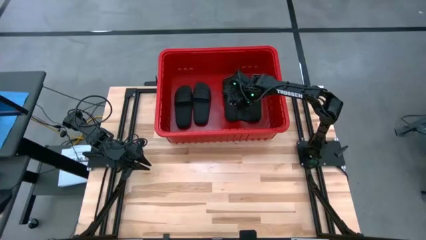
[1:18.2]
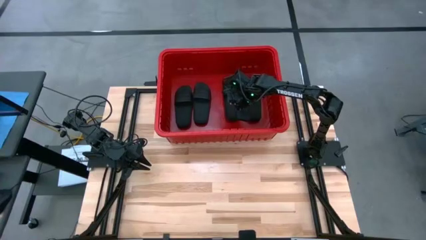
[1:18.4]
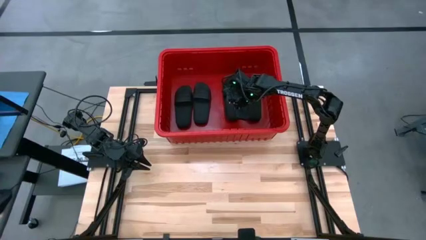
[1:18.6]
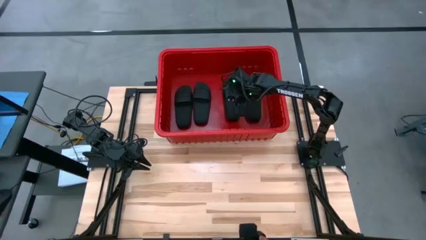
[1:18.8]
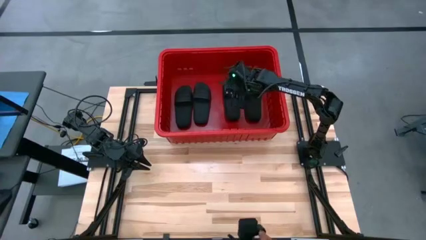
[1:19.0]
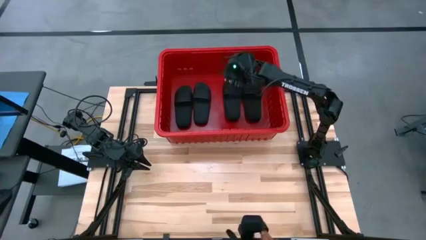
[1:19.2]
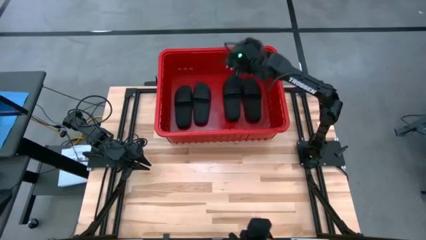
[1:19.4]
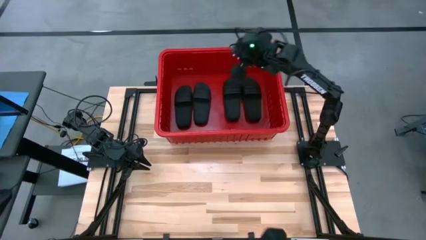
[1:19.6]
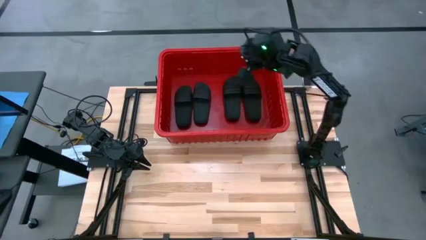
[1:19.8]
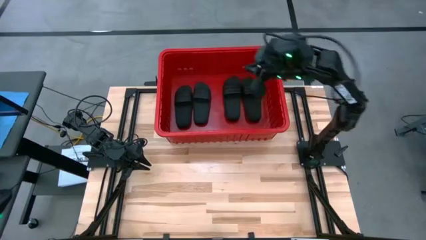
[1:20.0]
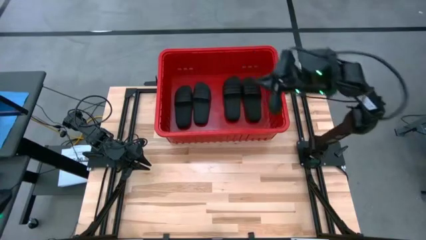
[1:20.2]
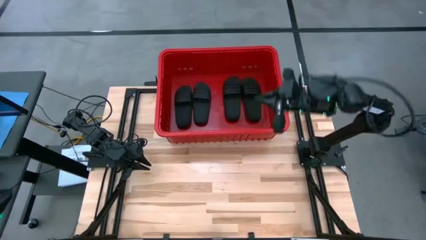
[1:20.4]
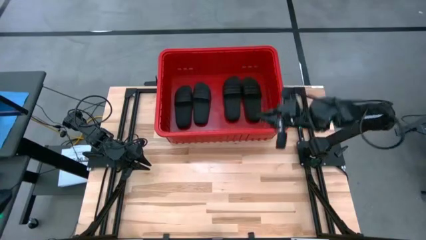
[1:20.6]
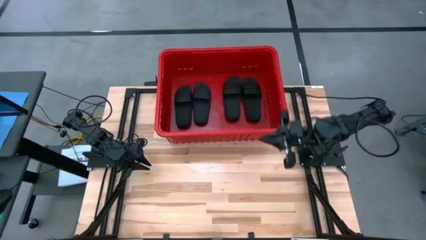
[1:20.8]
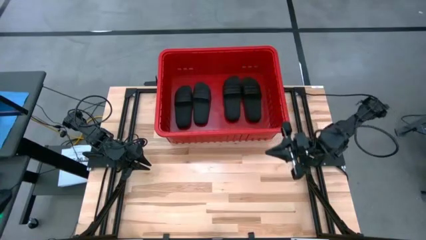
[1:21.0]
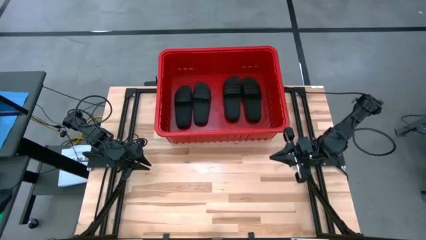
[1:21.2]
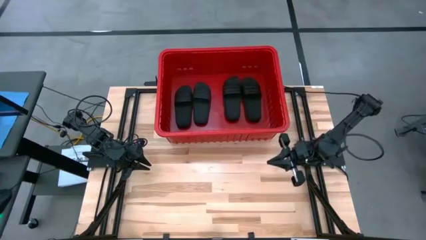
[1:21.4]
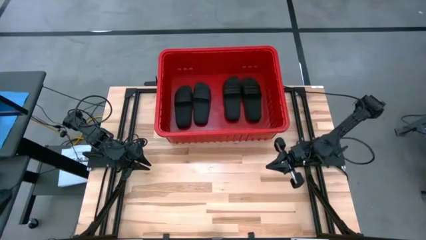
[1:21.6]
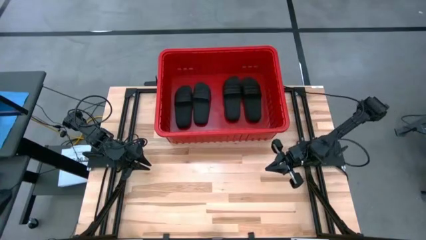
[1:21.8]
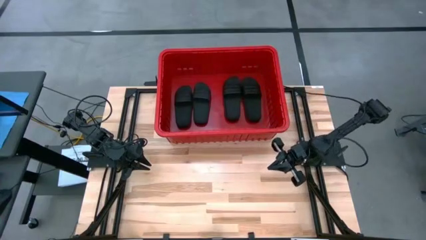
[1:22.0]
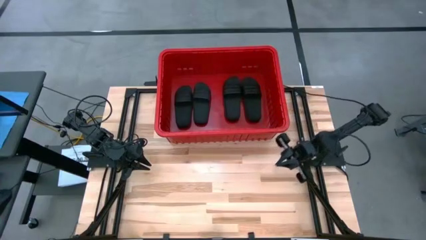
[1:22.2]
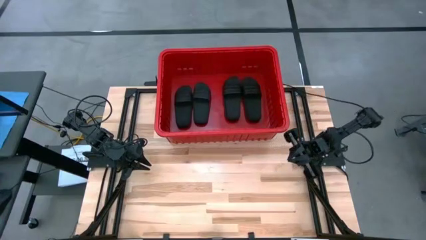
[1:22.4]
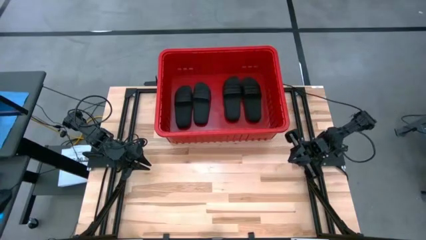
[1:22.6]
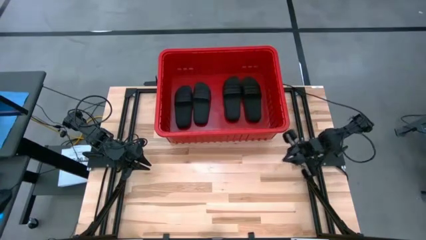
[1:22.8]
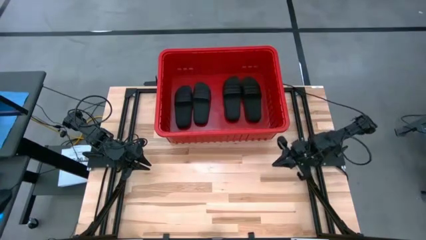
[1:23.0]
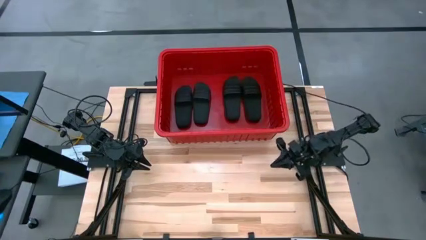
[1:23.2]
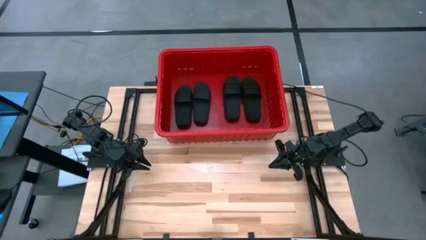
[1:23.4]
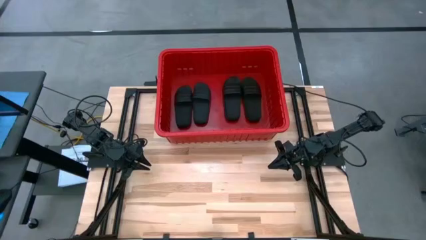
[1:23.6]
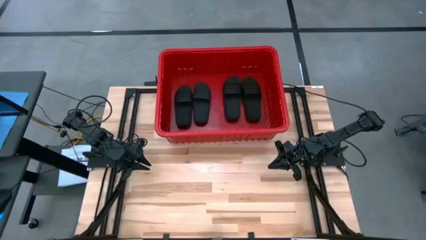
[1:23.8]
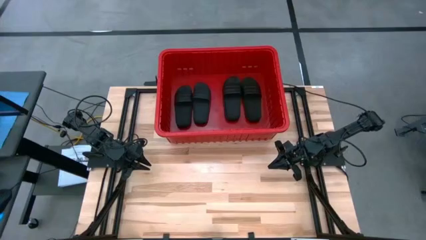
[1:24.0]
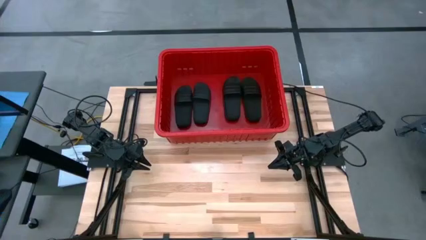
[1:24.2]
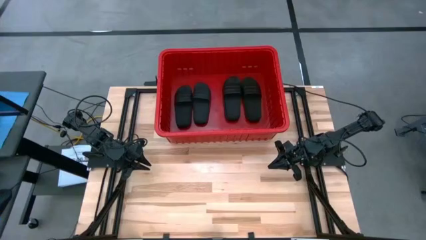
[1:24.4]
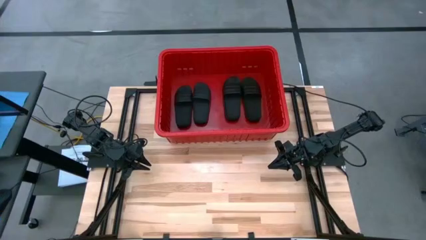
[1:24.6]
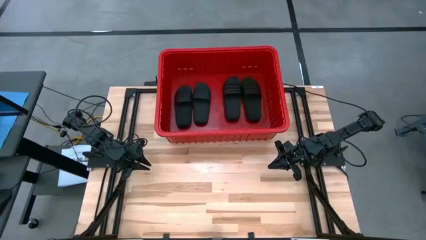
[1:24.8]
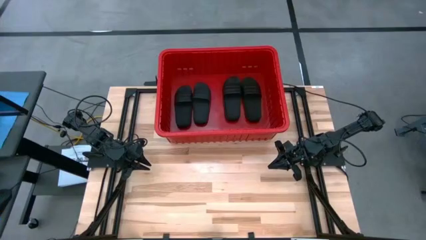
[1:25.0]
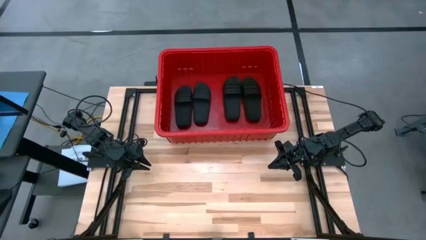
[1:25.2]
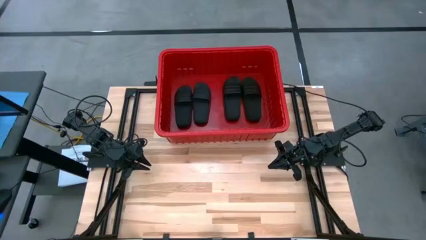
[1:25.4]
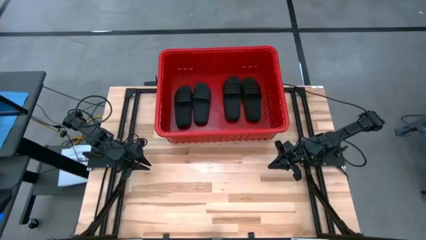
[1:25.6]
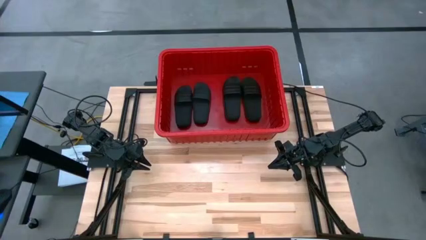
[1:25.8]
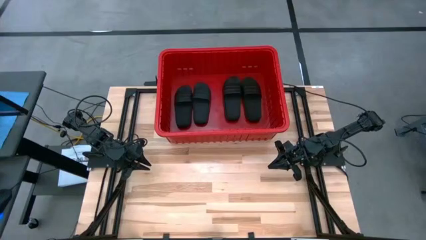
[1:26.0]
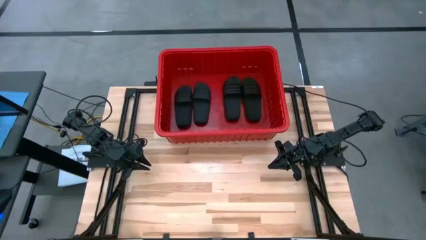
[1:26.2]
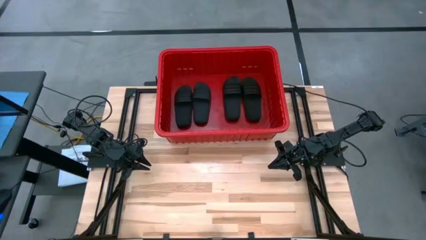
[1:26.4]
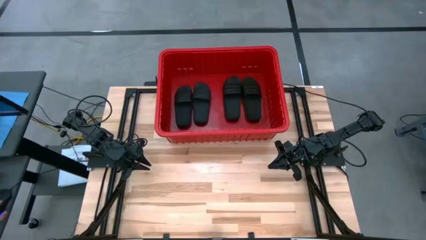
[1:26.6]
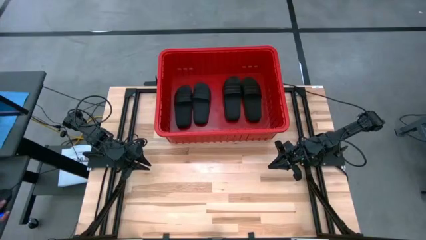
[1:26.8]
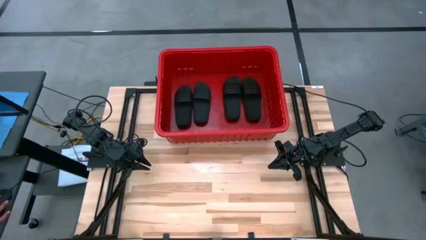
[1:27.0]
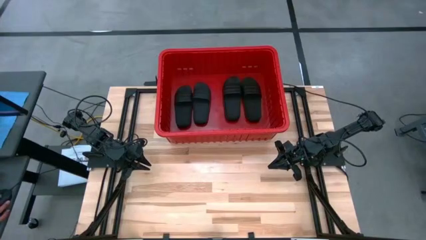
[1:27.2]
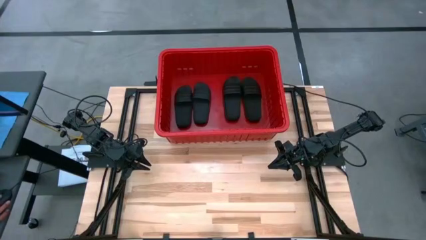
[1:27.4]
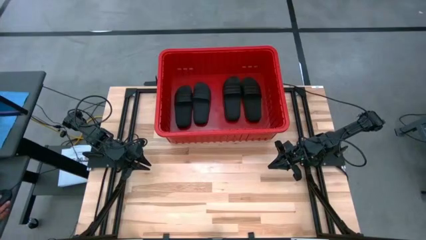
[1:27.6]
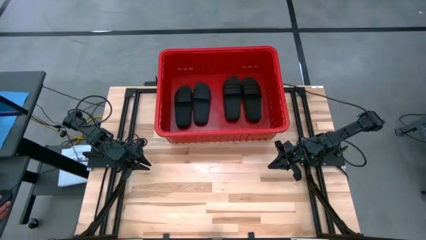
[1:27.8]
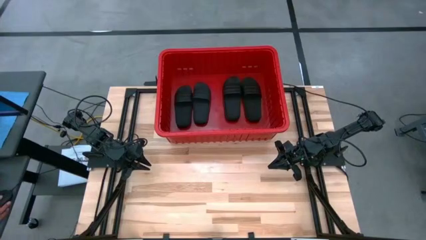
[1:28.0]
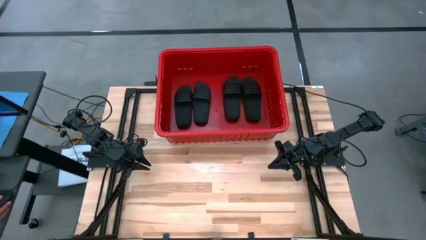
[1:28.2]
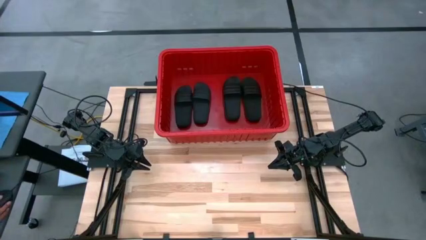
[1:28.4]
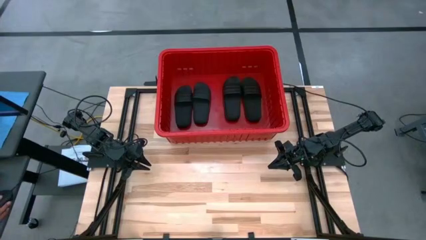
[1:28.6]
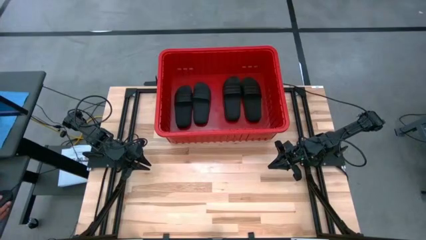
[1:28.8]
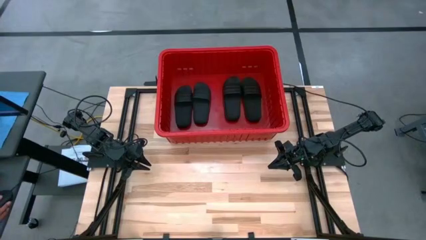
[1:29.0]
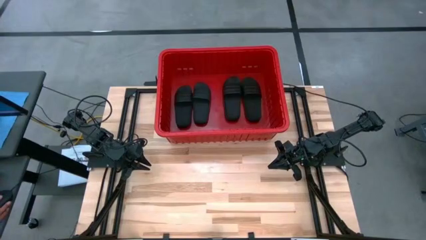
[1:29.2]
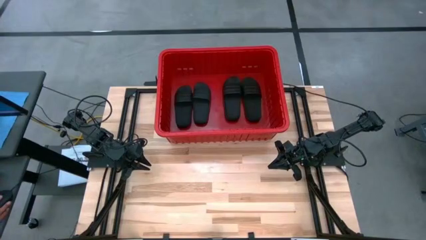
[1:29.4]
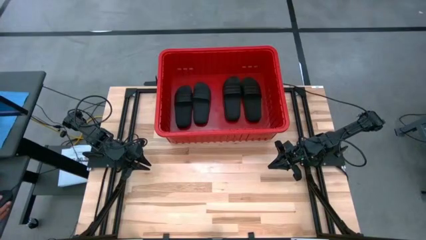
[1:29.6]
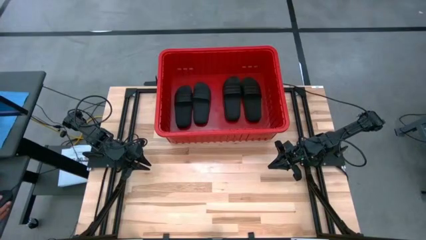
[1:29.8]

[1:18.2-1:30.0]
Task: Pick and place slides into bin
Return to Home Position

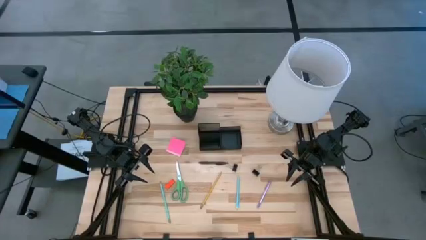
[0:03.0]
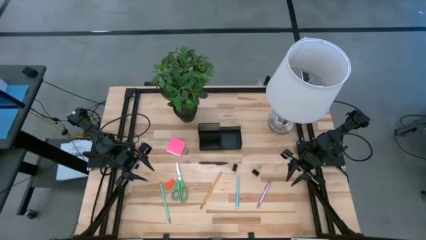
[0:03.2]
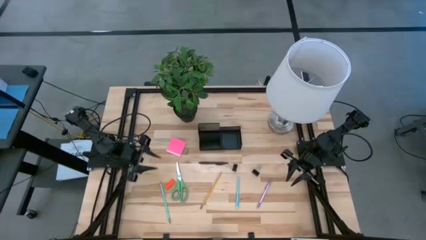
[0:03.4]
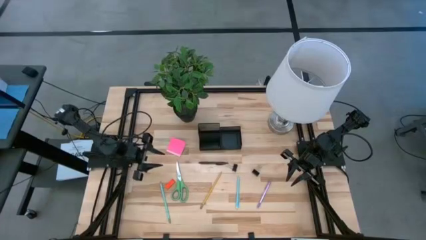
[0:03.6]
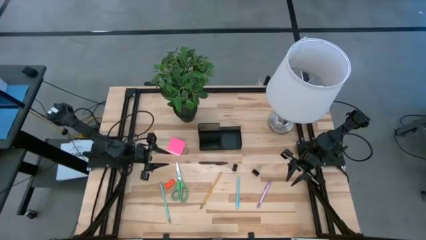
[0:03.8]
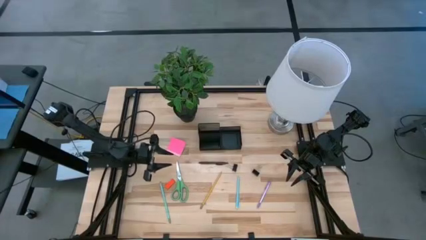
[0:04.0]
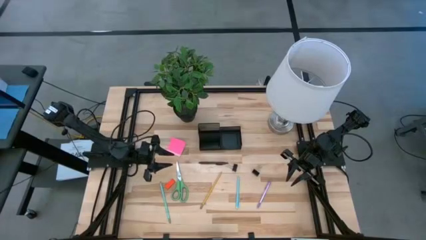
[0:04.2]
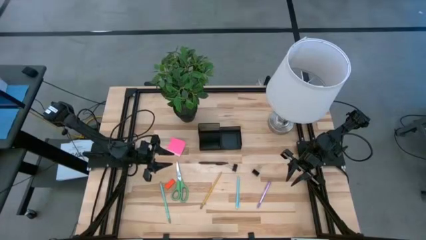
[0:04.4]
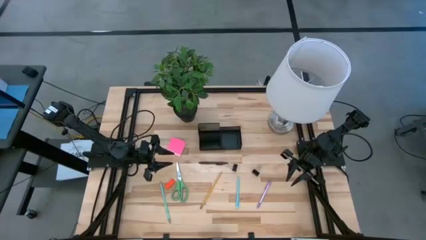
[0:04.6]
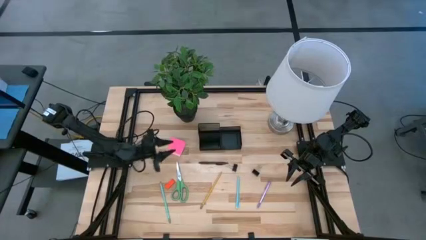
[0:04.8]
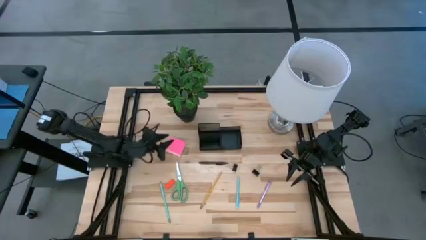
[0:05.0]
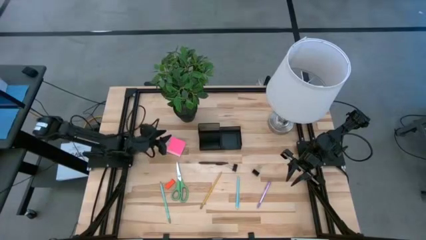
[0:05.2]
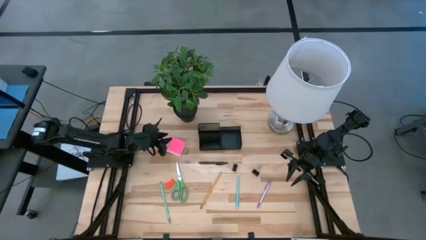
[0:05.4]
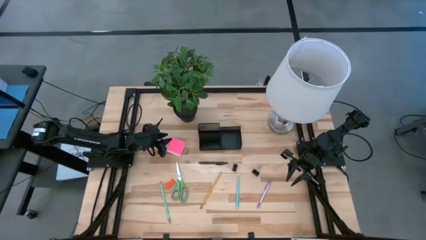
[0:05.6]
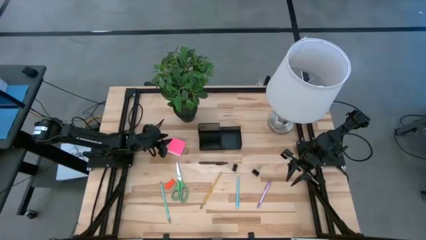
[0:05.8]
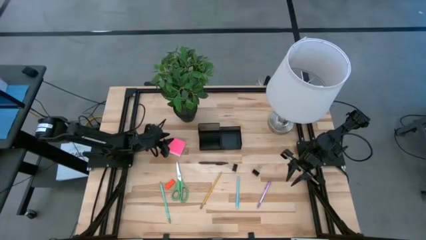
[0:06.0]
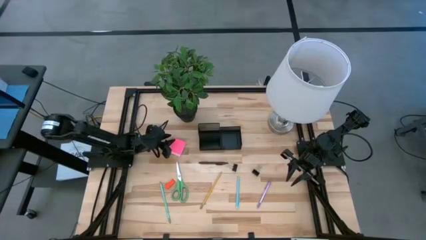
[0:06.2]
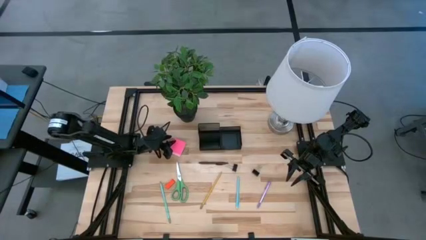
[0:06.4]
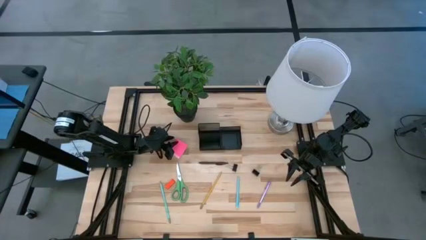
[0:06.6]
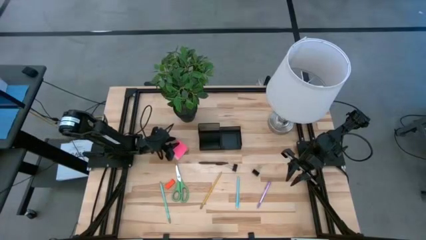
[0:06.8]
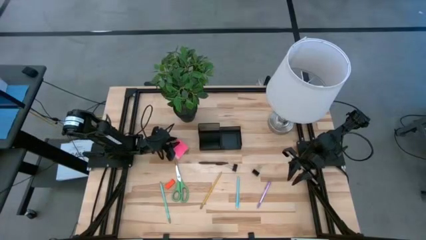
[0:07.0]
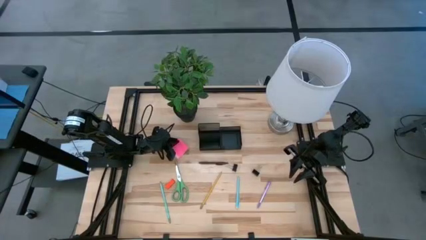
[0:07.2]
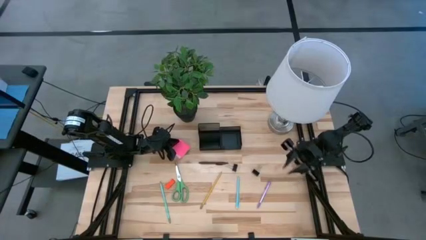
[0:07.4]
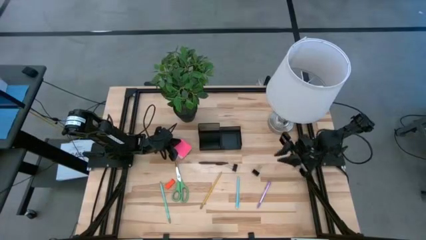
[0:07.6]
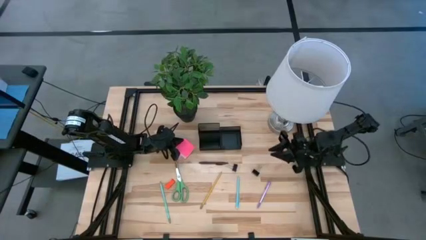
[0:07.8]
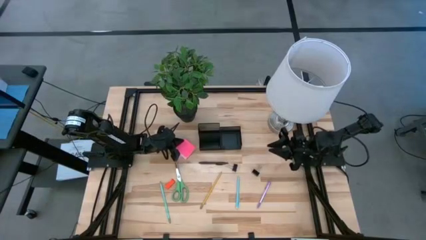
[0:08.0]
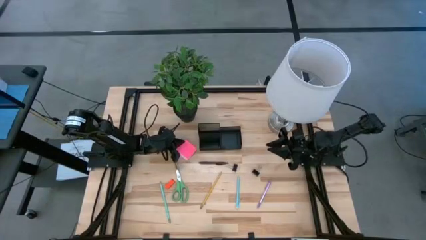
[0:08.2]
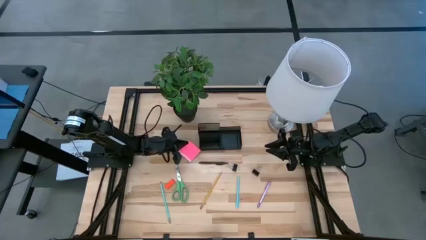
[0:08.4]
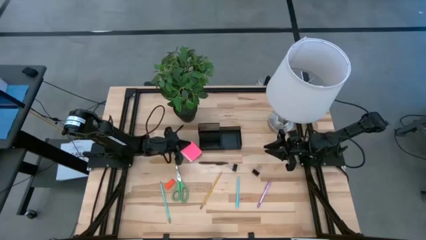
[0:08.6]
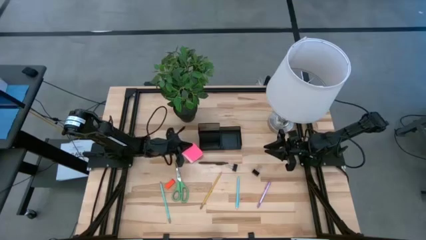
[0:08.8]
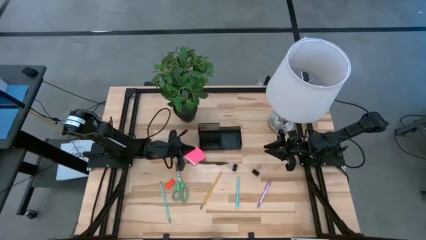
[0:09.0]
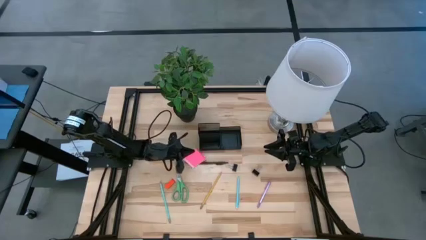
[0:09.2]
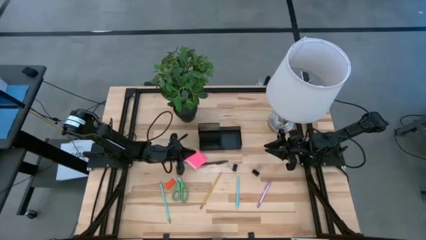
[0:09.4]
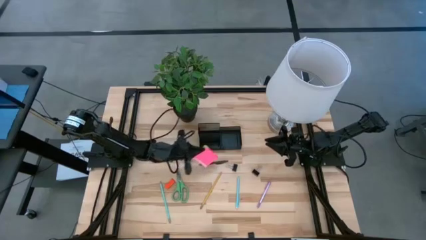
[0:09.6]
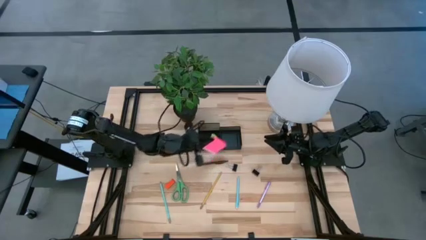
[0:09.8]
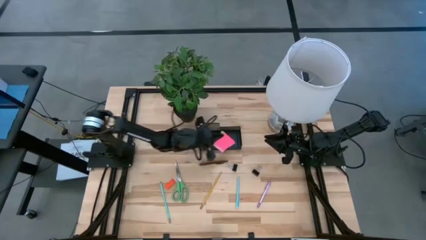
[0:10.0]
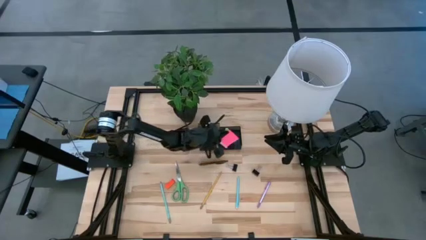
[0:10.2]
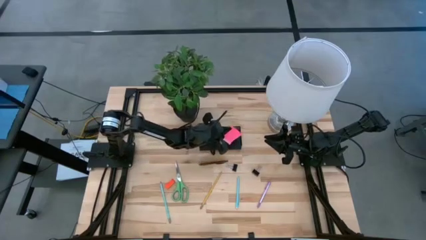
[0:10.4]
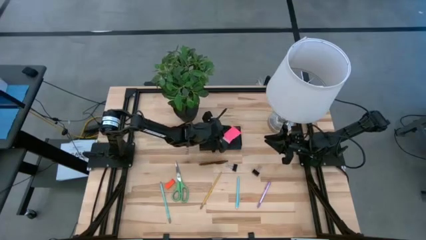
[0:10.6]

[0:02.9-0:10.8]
Task: Pick and place office supplies into organizer
Put the pink sticky notes into the black desk organizer
